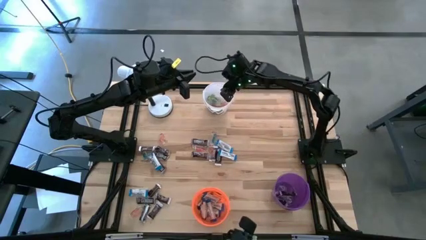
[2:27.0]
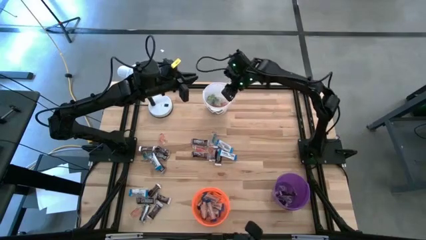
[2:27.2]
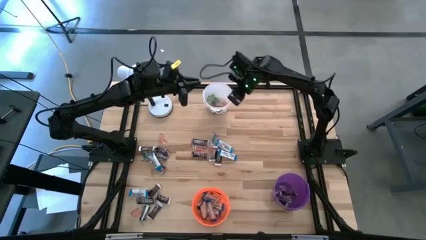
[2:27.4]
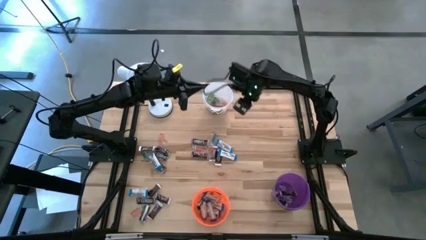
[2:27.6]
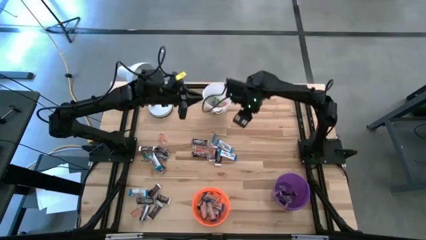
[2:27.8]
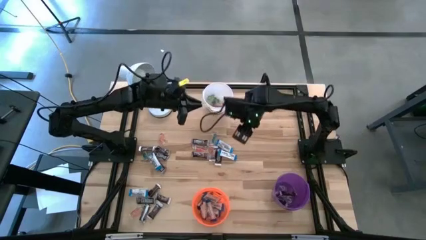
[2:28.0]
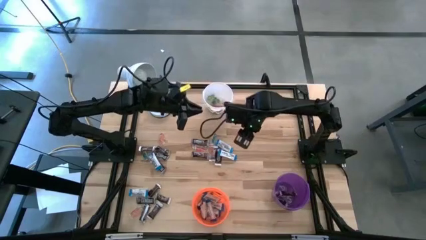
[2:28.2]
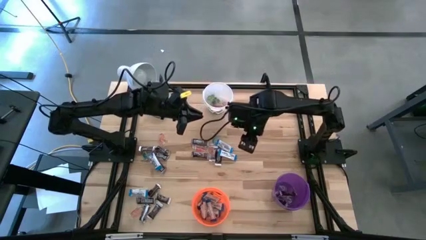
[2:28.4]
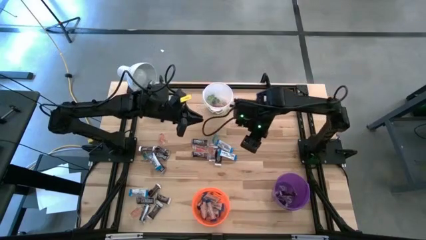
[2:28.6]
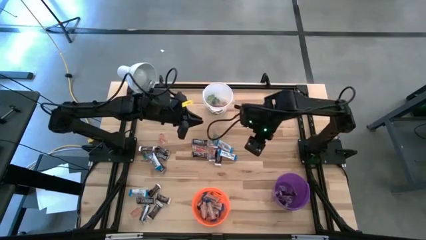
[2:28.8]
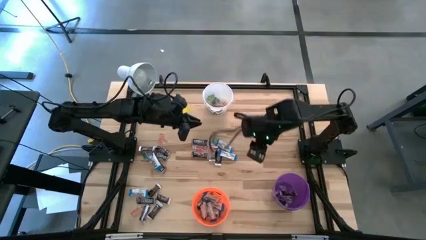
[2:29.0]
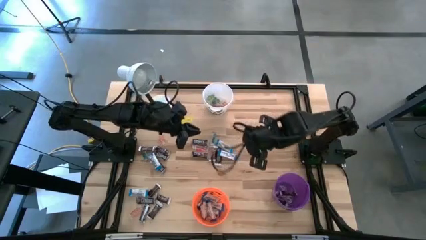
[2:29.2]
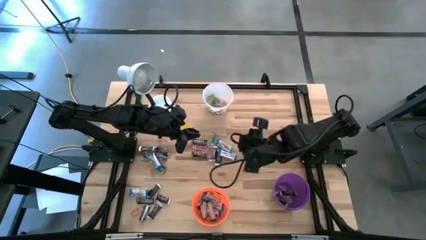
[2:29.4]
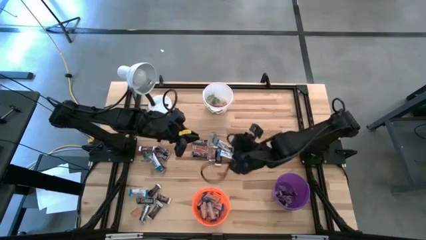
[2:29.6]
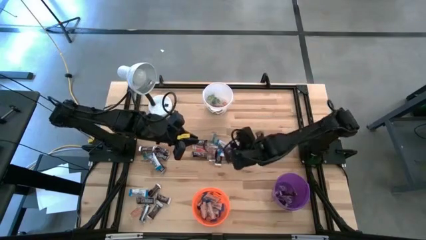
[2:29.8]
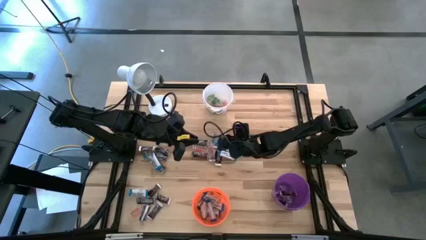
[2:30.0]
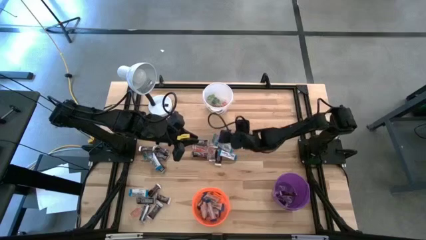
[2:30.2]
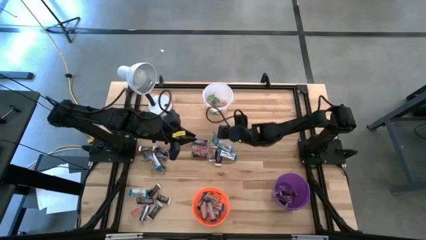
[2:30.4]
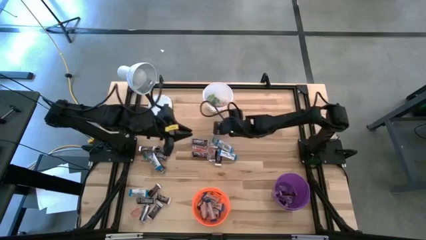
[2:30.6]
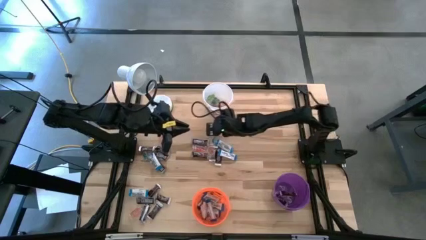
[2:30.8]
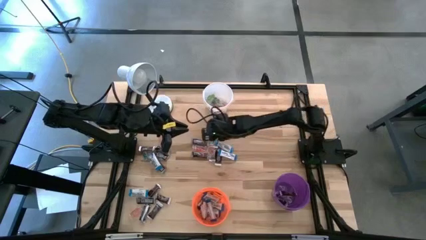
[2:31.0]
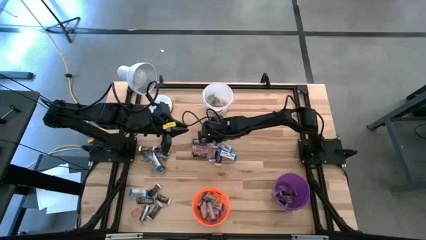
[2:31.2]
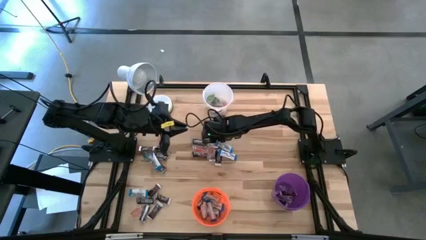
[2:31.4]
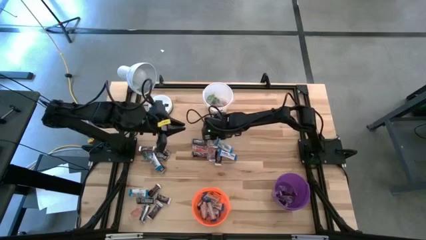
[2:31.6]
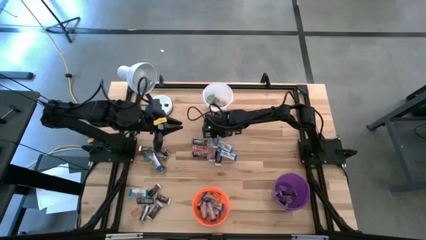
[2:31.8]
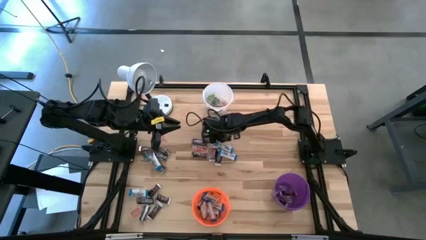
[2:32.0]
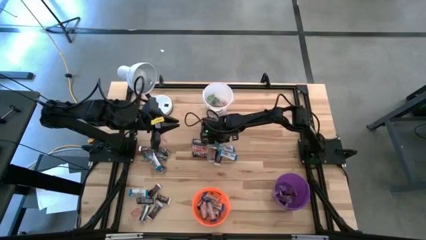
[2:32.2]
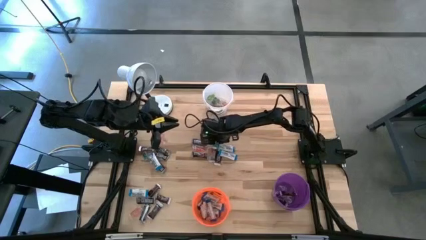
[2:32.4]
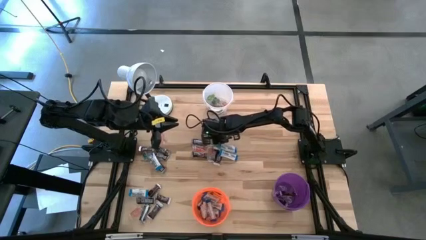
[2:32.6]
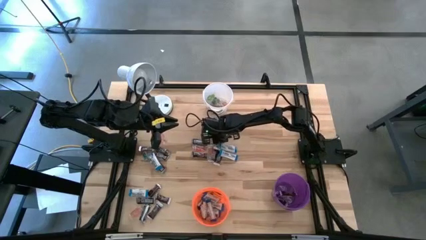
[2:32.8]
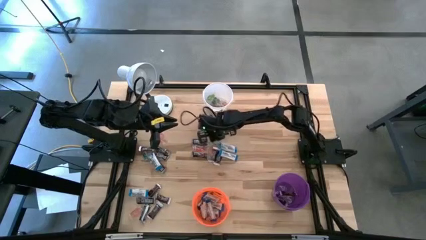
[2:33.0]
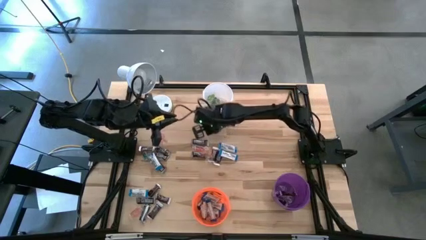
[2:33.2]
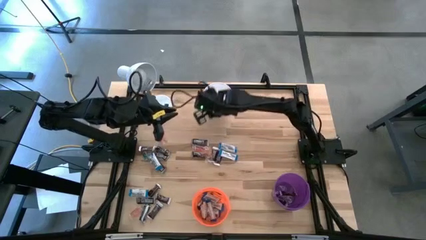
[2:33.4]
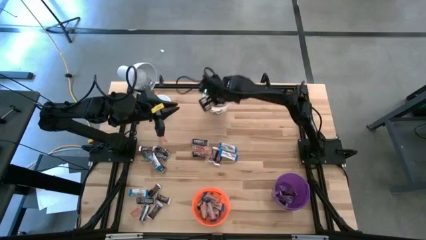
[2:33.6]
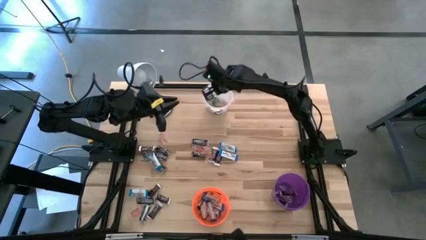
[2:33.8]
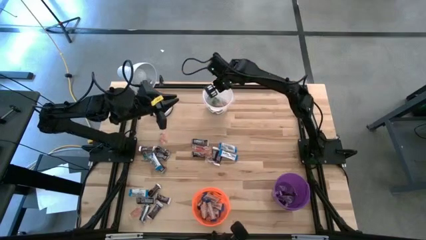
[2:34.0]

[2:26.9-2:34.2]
Task: Organize candy in baskets
Put the blue gummy into the white bucket

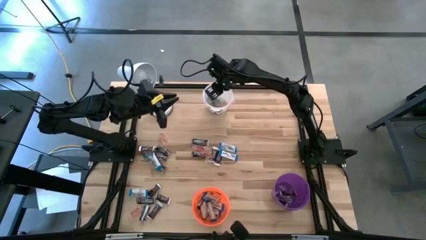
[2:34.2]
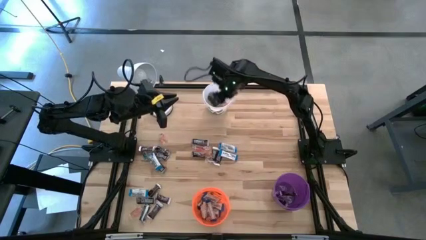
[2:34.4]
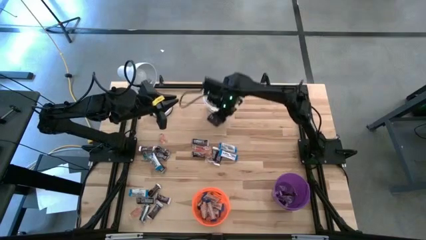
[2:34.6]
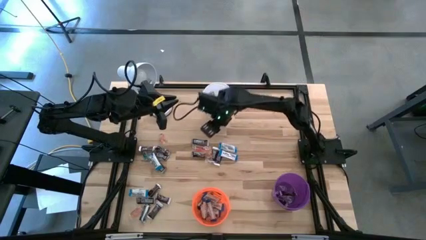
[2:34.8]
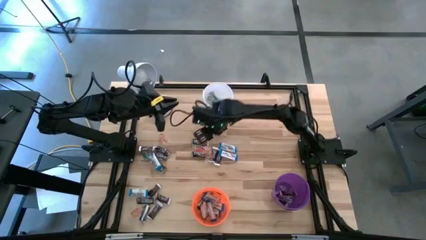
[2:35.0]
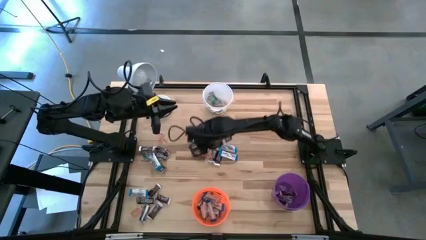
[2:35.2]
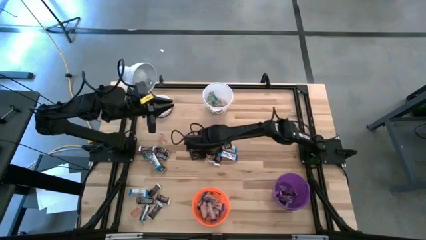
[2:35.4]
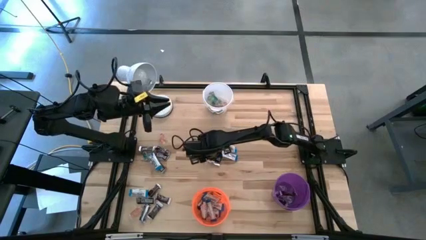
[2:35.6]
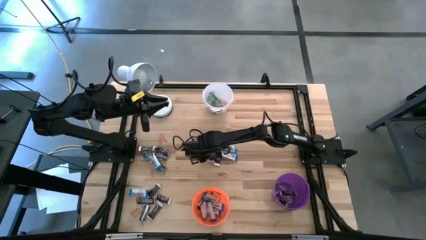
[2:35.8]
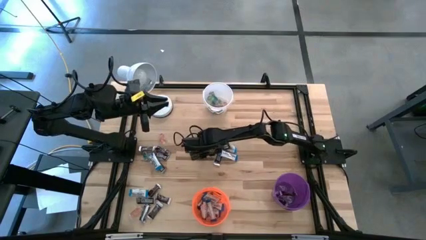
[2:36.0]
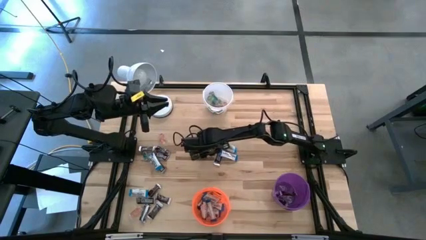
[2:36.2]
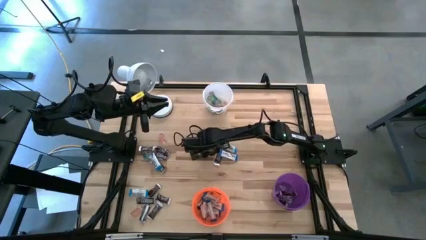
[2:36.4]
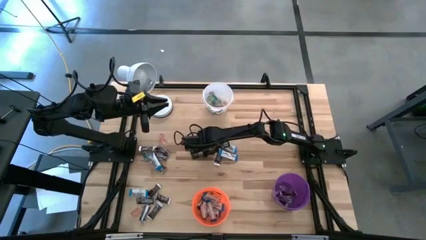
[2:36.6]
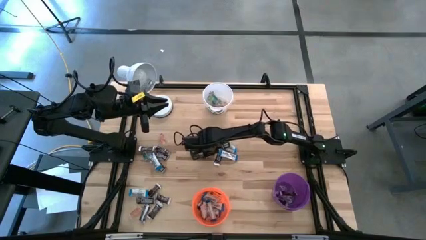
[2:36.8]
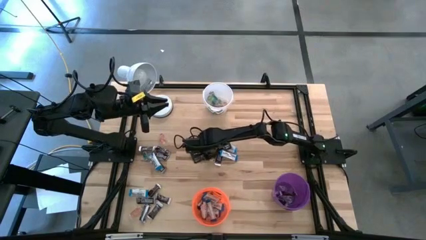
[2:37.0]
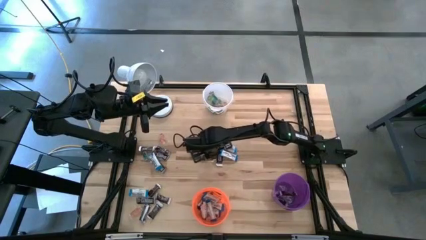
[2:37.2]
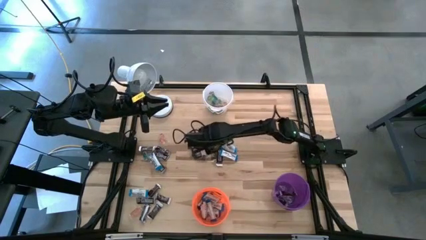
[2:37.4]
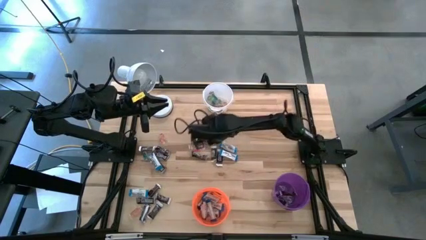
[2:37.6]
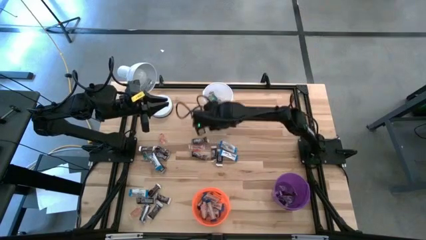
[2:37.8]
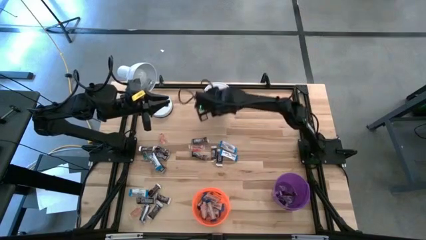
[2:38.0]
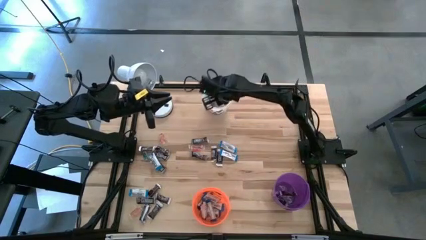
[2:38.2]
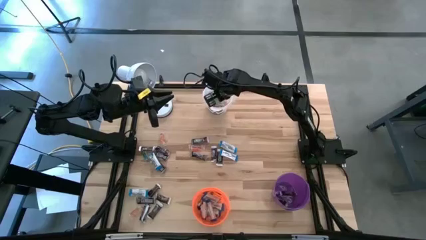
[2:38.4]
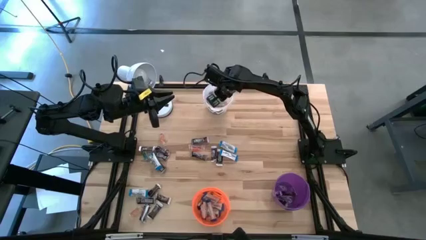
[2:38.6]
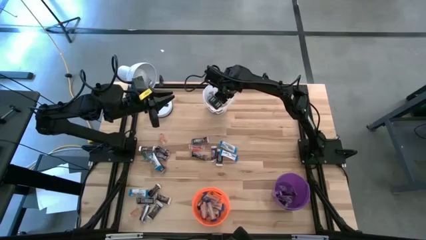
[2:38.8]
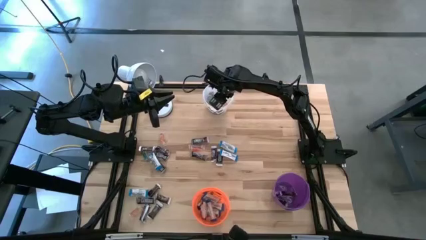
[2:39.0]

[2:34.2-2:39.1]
Put the orange gummy into the white bucket

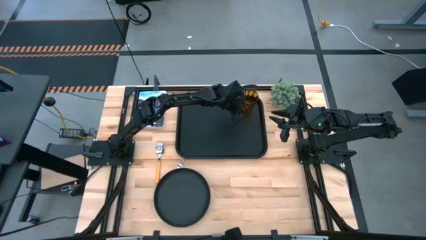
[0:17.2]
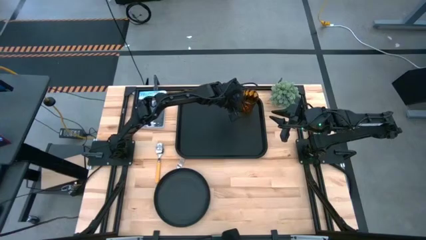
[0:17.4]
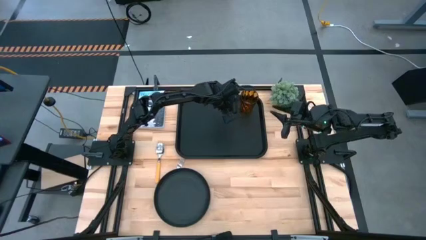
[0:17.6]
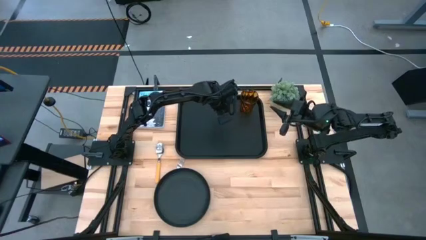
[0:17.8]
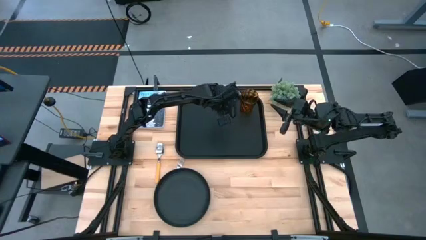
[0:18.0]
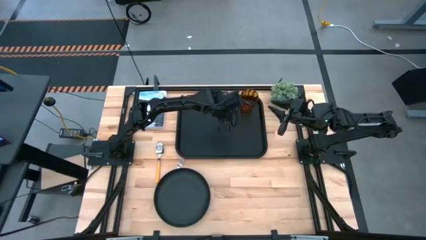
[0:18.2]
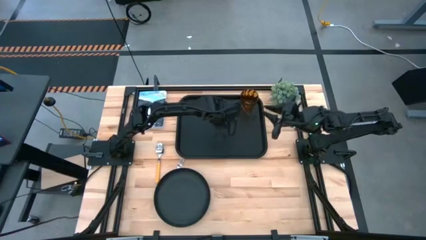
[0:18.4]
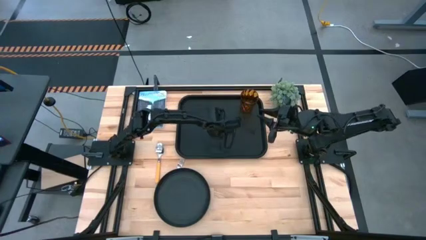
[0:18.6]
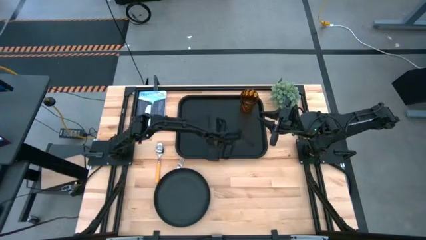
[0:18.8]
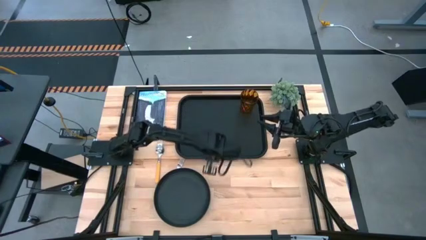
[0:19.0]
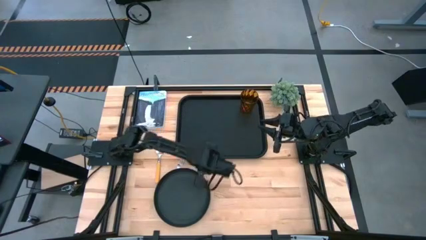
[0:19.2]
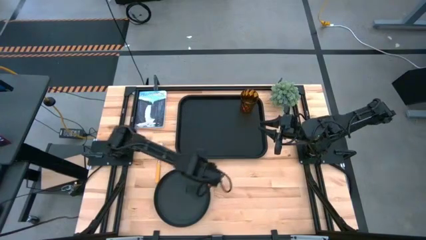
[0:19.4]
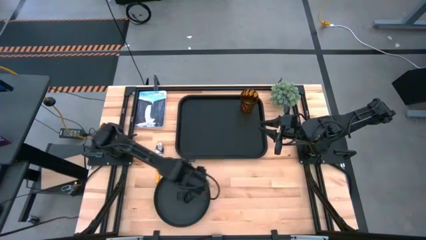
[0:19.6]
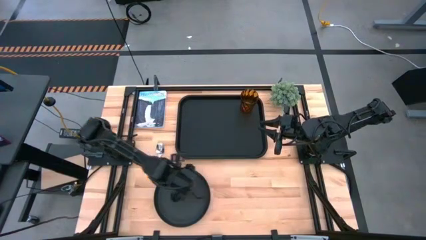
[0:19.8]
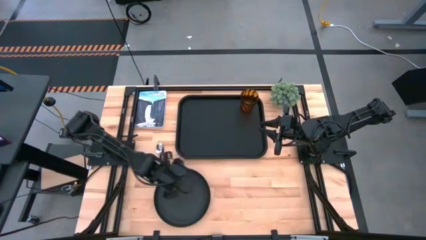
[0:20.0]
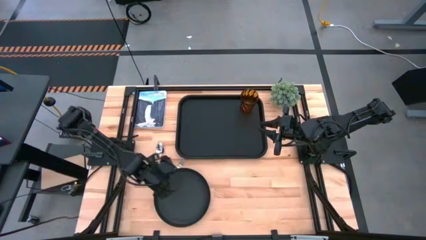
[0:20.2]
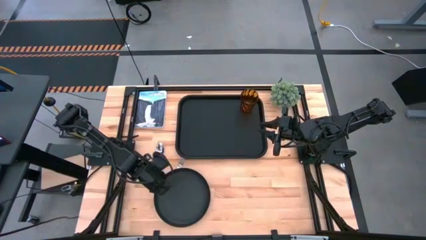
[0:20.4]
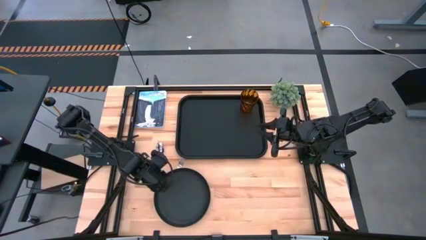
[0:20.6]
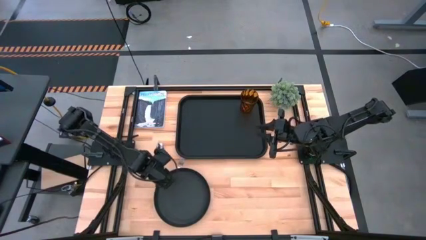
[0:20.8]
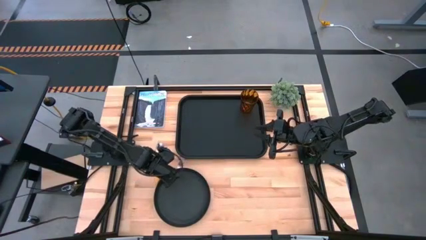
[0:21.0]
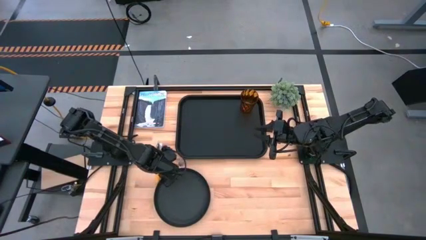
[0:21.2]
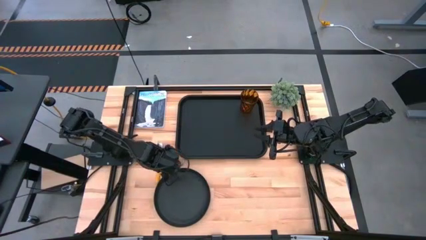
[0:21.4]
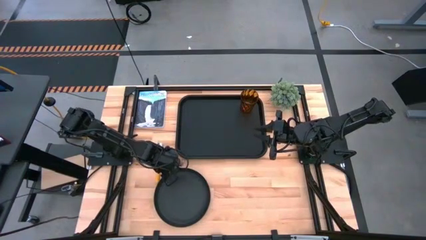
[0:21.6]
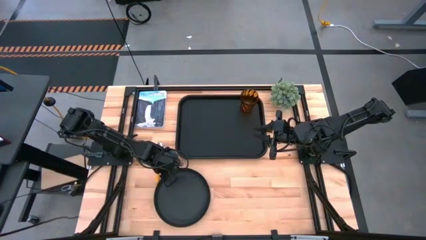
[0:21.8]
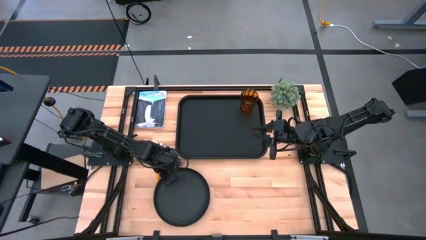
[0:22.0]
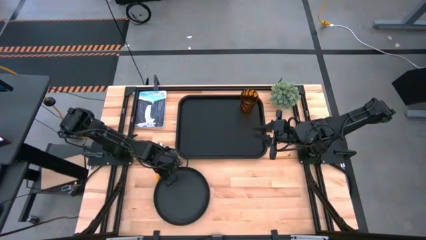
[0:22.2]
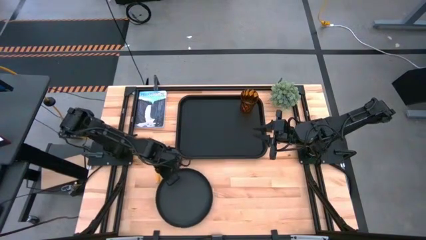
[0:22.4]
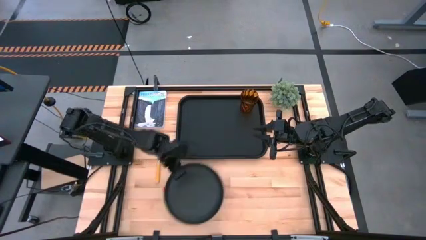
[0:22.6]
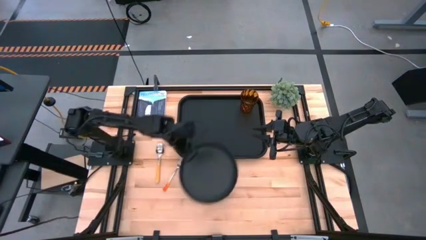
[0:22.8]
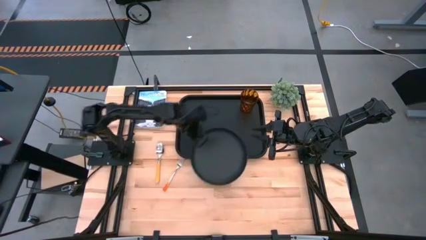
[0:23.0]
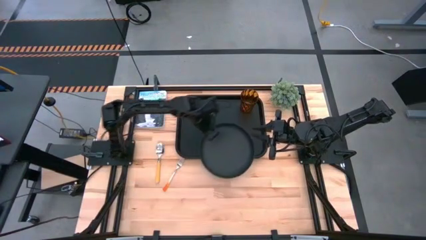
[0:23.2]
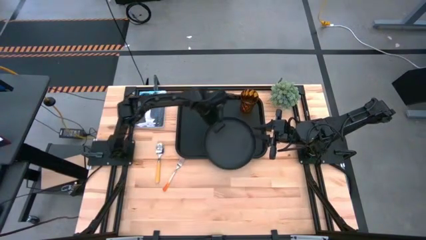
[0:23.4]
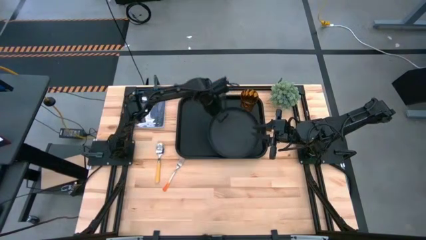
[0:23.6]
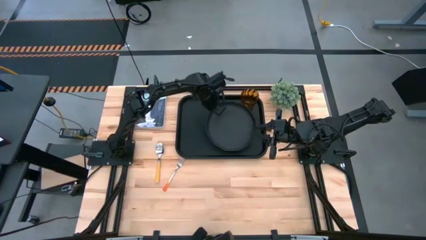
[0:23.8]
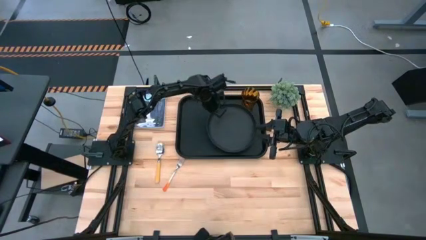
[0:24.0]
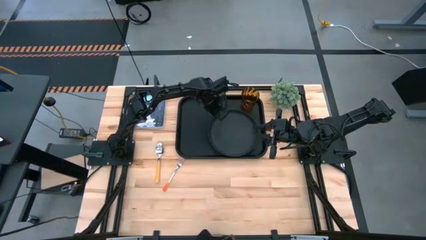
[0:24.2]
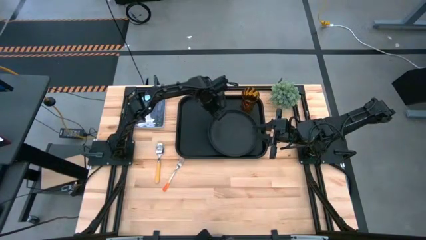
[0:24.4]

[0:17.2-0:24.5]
Task: Pick and place plate/cup/fork/spoon on tray
Put the gray plate on the black tray
